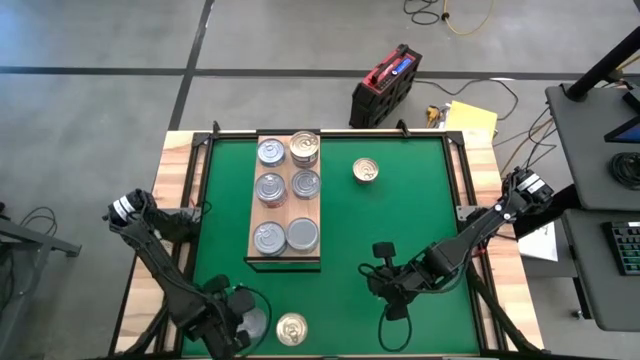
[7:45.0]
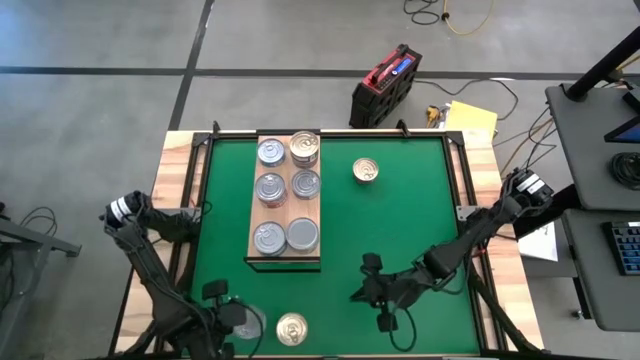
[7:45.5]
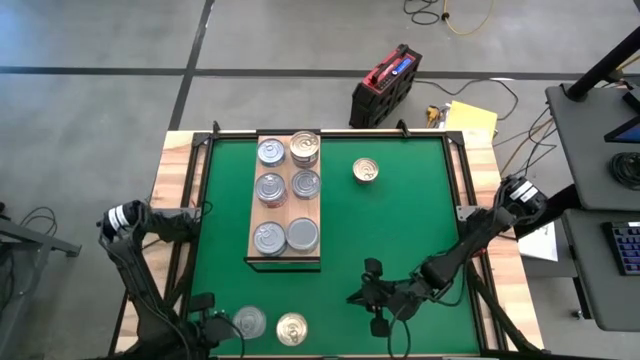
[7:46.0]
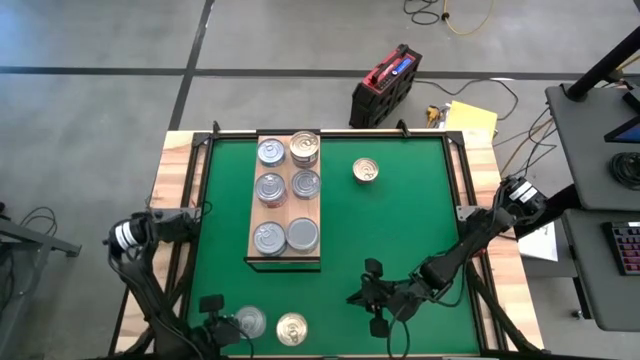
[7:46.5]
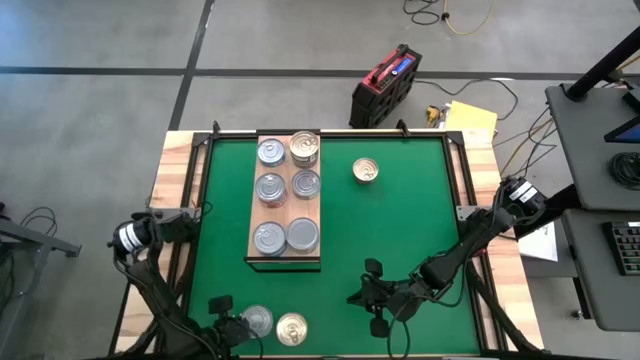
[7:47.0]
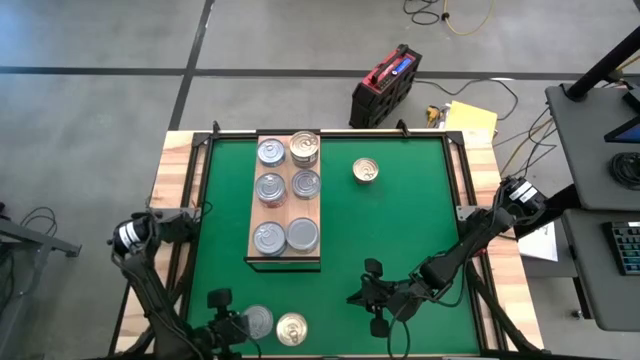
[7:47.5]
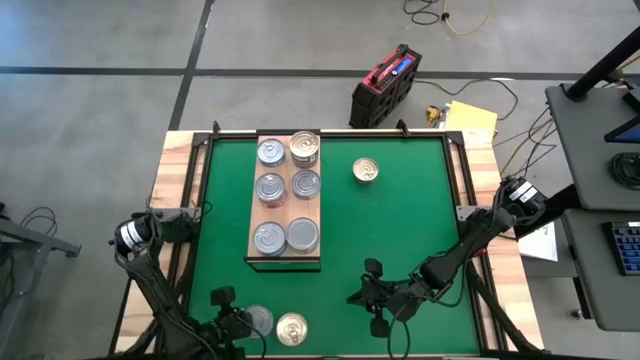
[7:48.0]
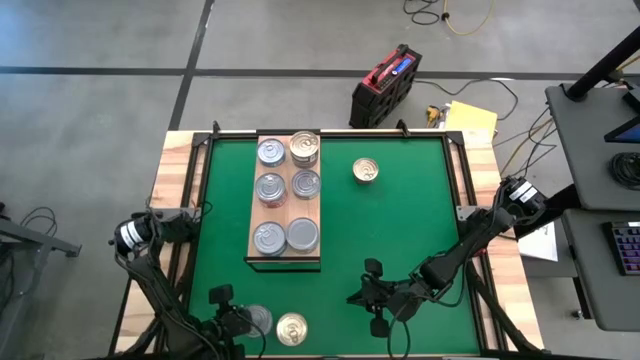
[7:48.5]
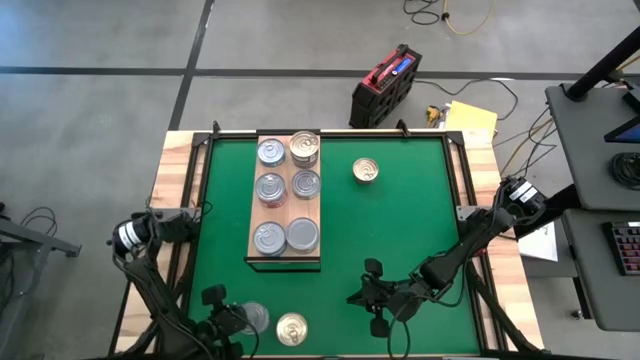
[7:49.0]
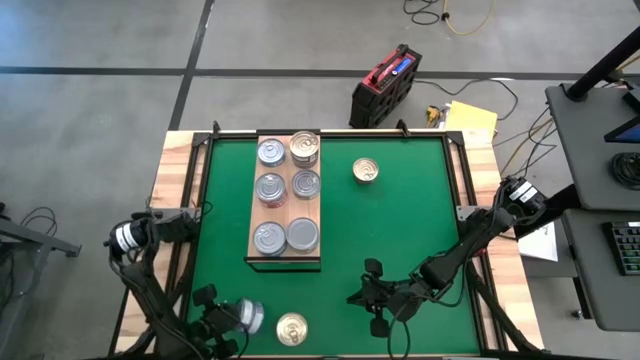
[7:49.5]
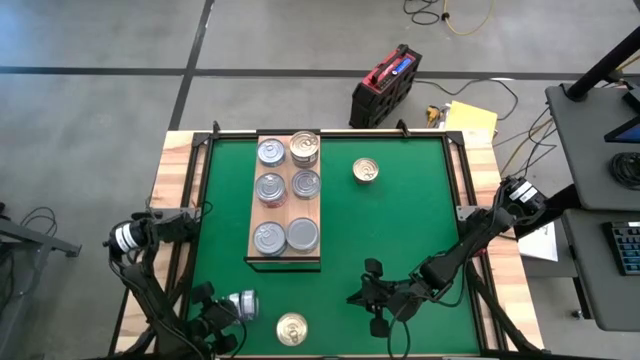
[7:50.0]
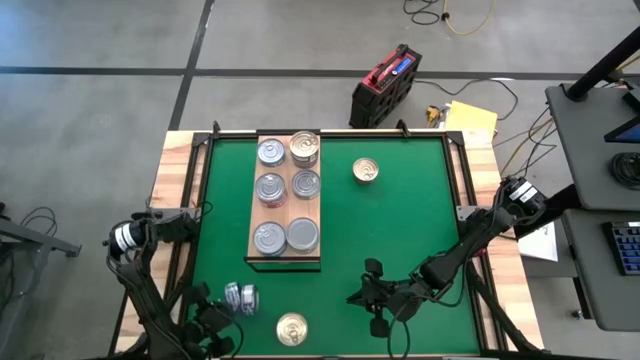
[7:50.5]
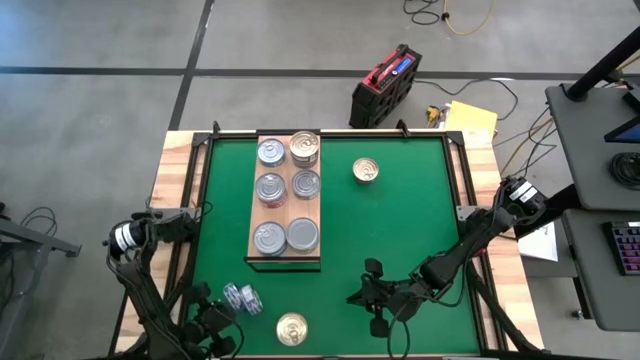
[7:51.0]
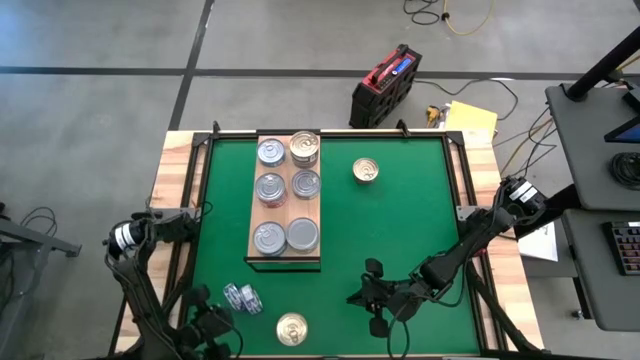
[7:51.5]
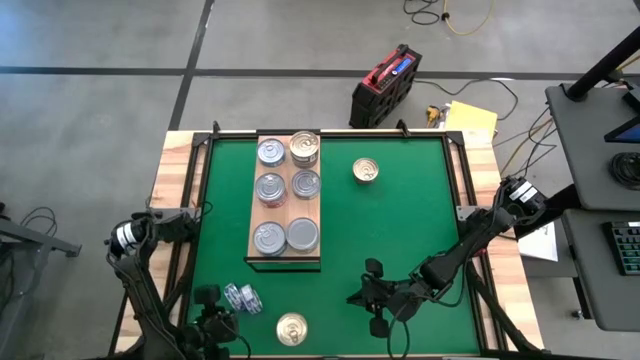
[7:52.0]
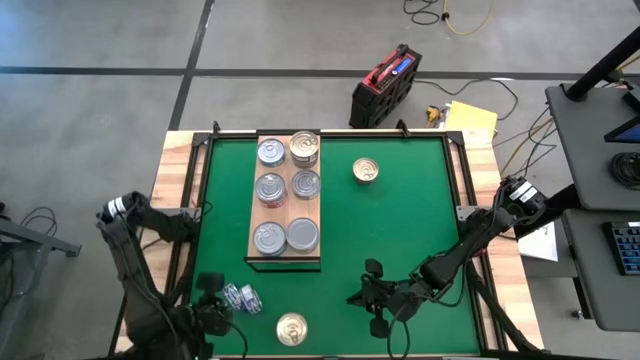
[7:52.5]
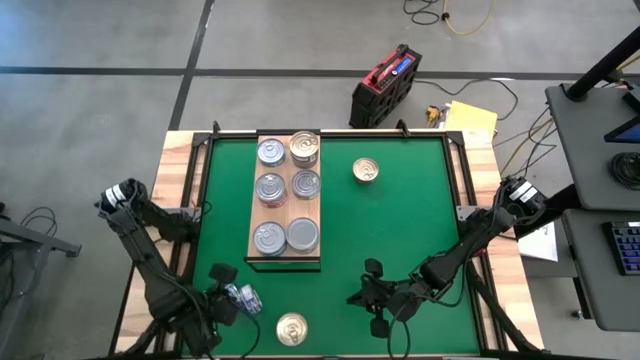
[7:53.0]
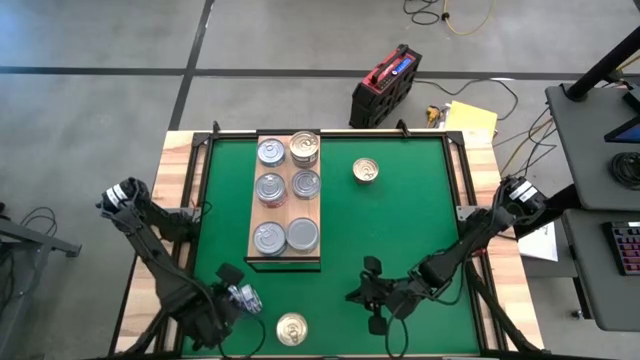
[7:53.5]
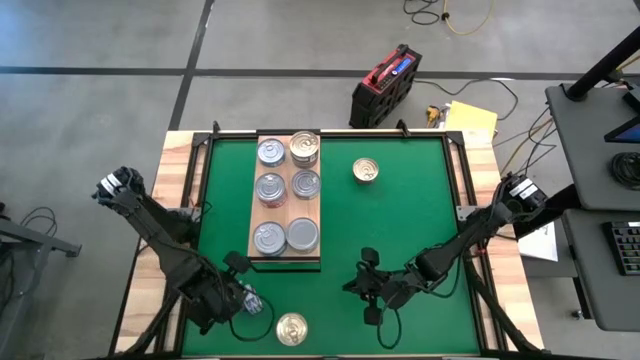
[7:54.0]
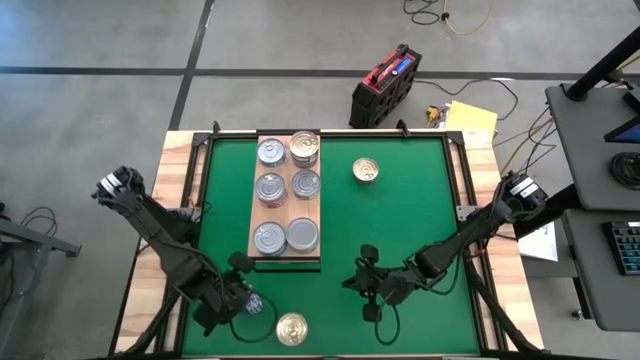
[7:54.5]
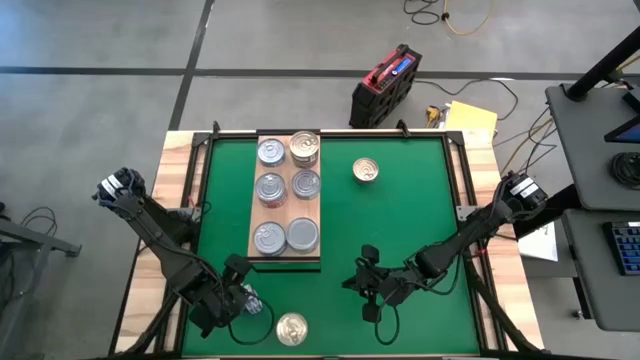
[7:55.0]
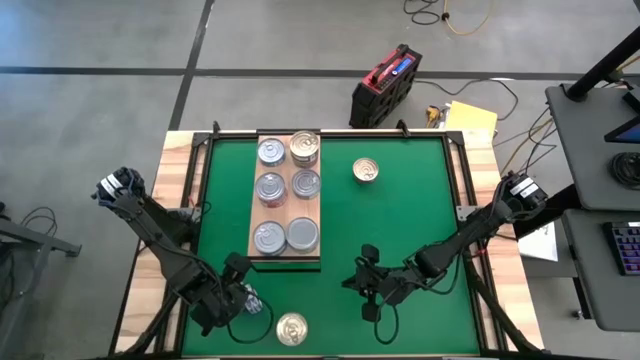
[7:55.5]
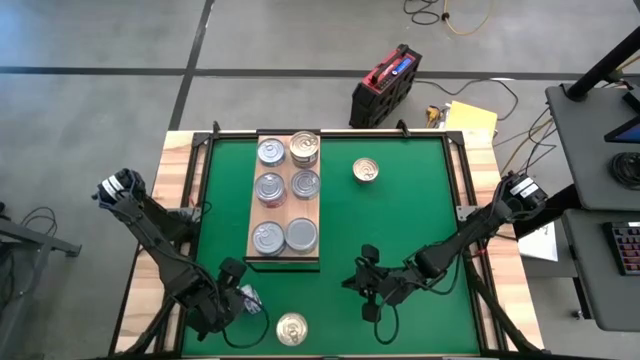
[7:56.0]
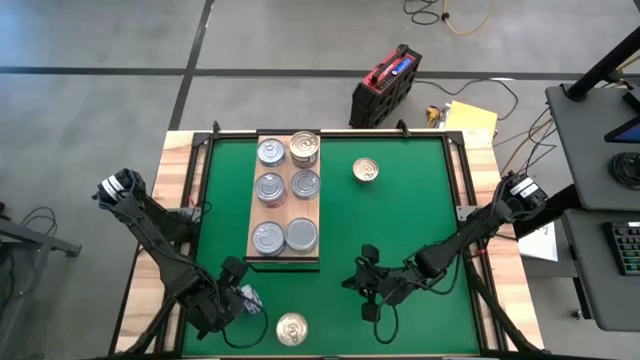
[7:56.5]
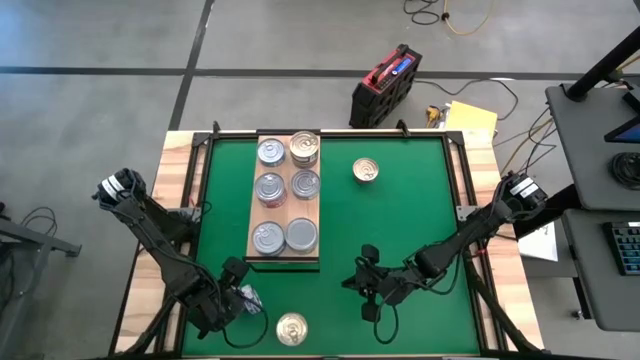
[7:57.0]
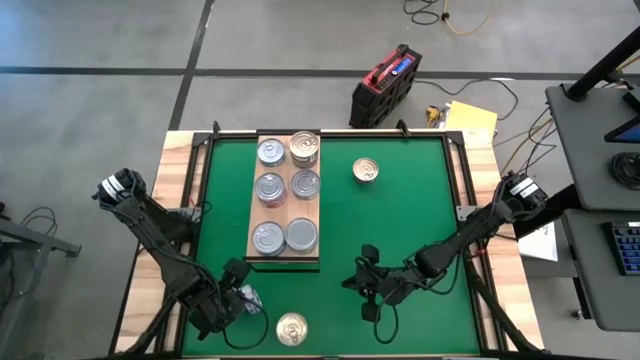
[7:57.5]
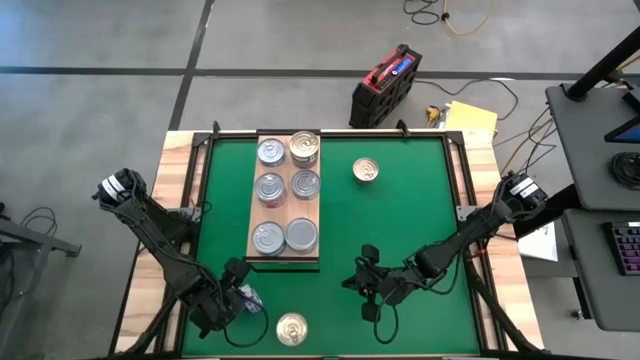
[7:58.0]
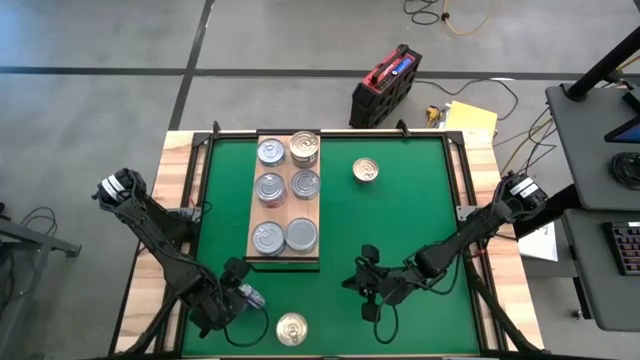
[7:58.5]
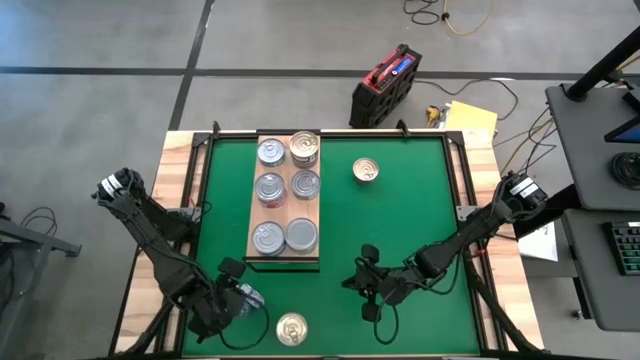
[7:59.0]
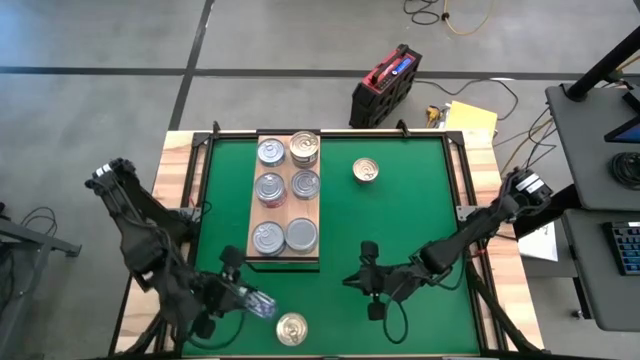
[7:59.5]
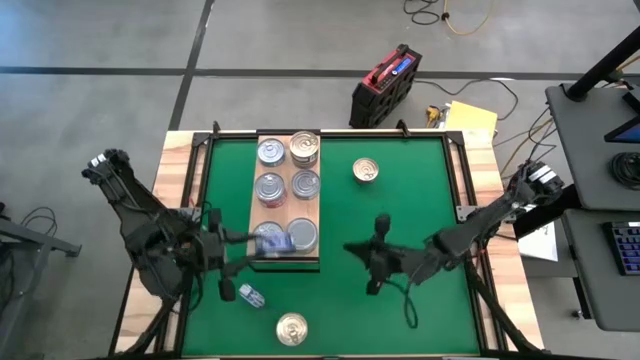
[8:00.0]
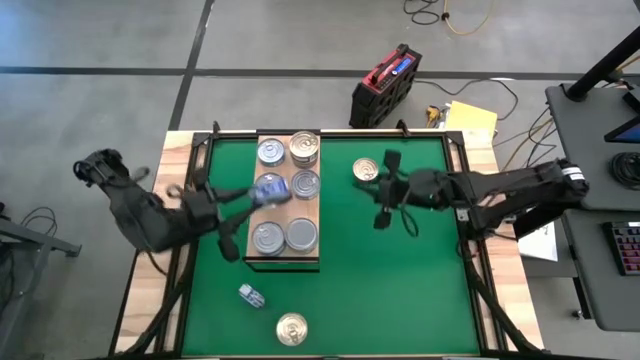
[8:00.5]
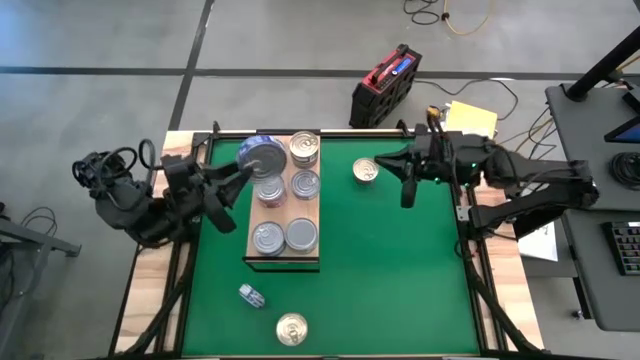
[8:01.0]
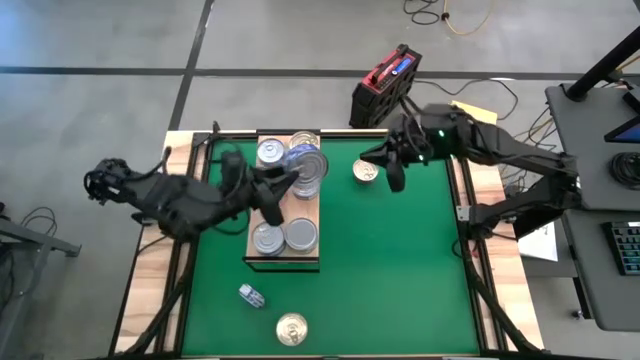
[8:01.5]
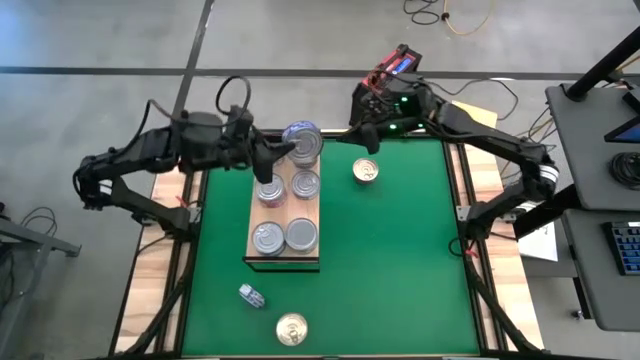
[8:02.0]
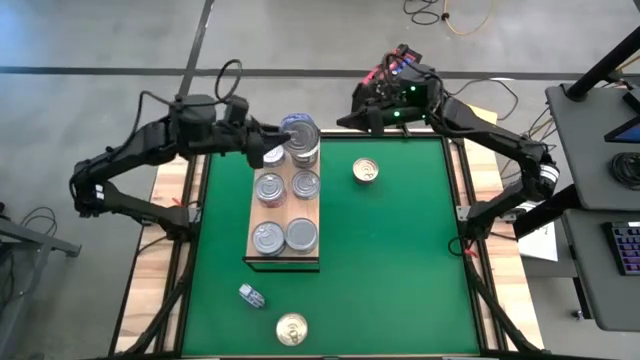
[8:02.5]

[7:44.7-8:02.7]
Task: Stack canned seafood by type on shelf
Put the blue tuna can on the shelf

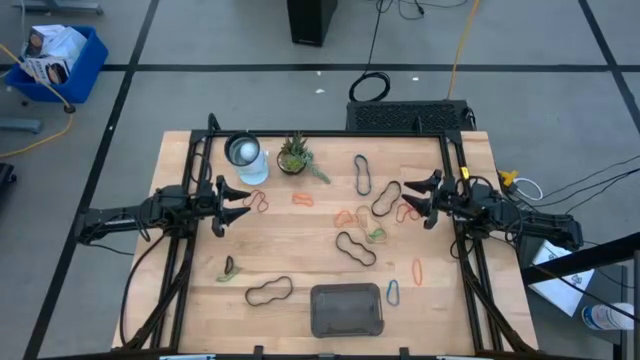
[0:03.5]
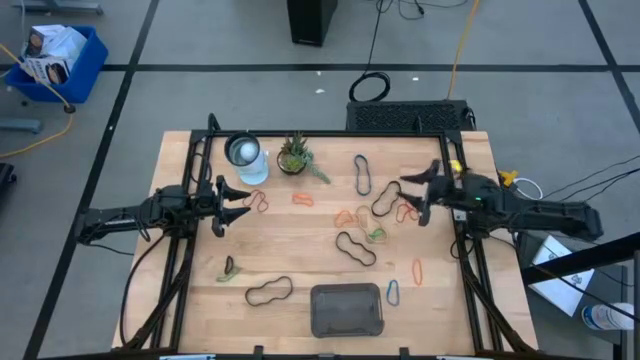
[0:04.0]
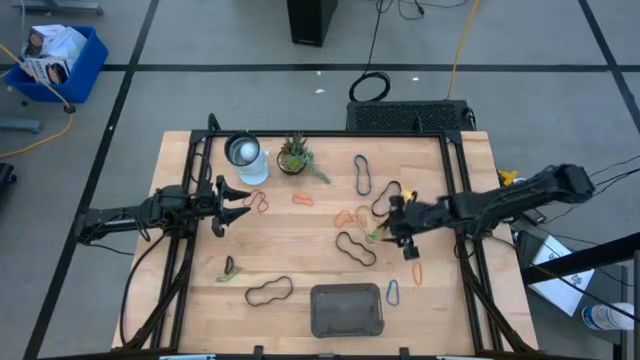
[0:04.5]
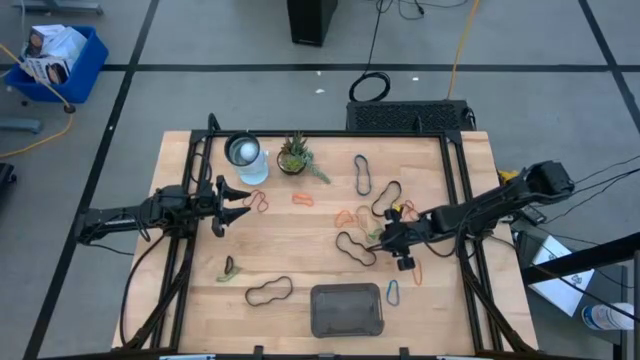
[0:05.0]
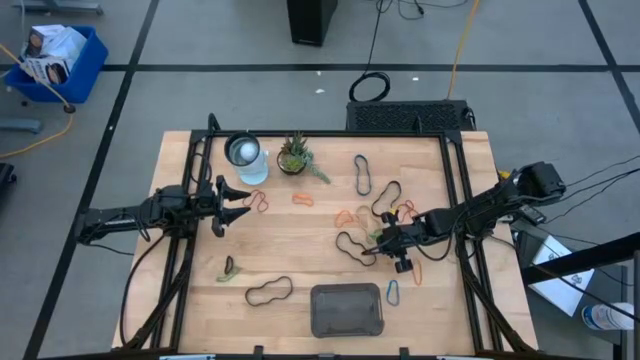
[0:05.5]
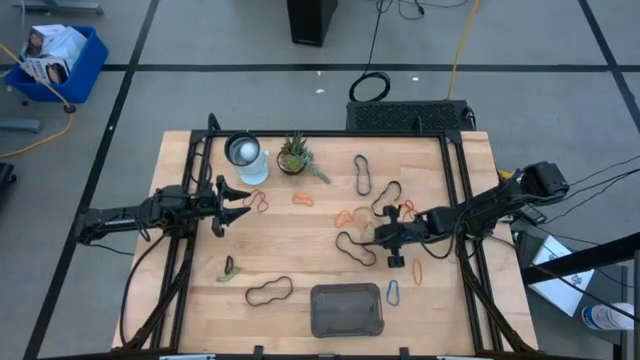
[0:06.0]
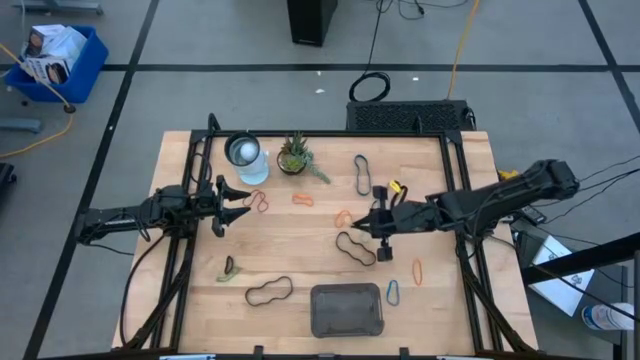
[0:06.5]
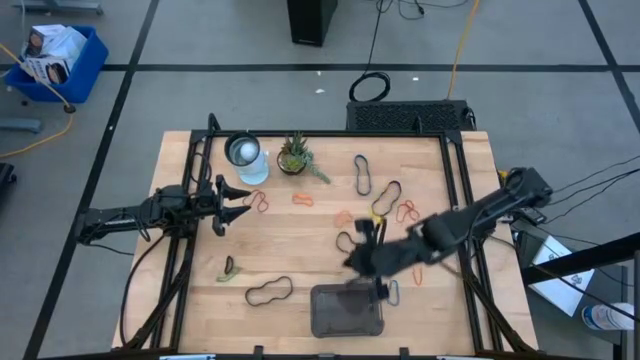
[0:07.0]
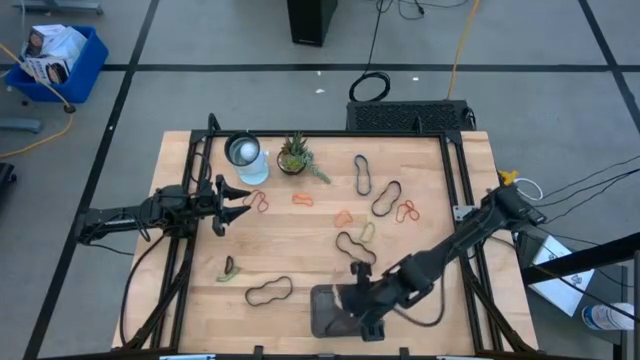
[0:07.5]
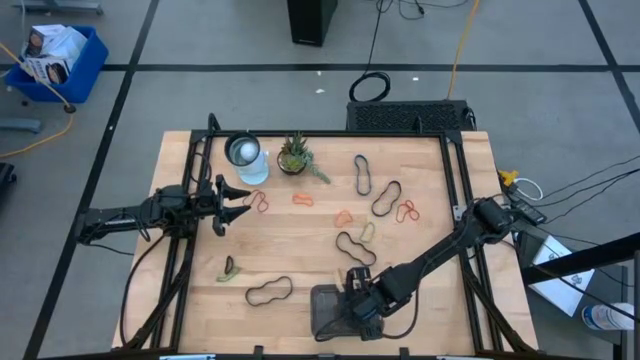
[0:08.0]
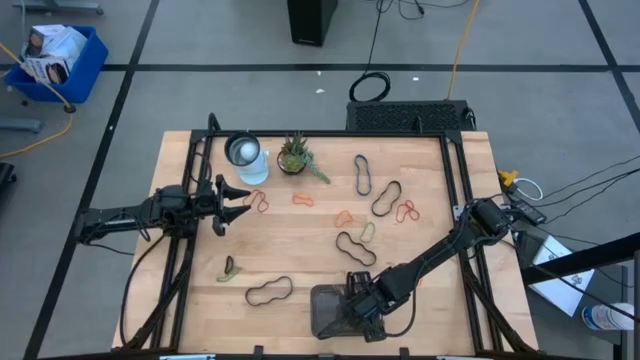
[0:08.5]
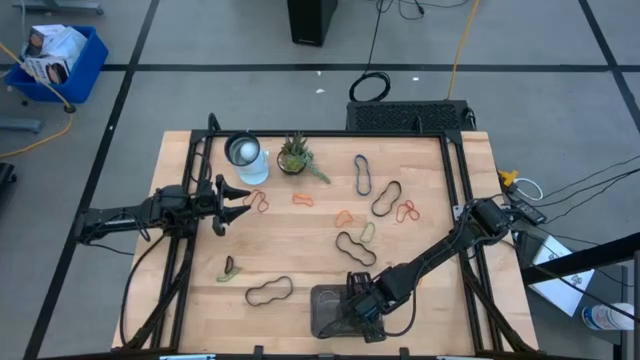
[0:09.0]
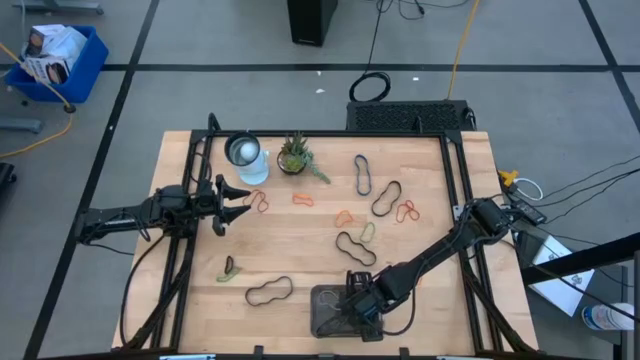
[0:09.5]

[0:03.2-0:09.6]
Task: Pick and place rubber bands into bin
Put the gray rubber band into the black transparent bin
